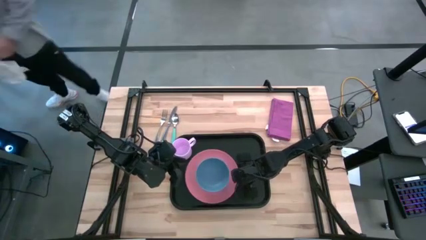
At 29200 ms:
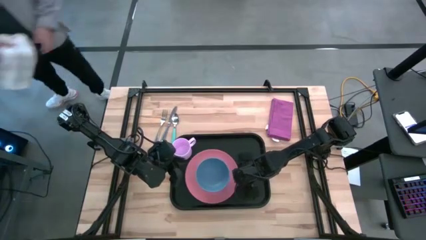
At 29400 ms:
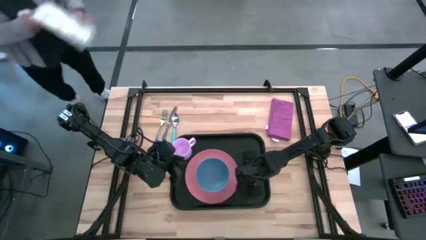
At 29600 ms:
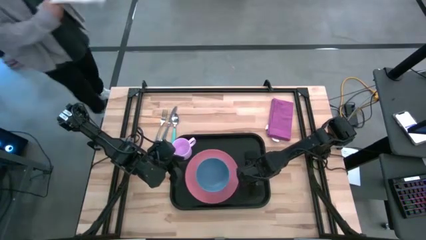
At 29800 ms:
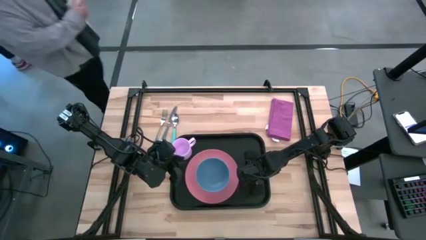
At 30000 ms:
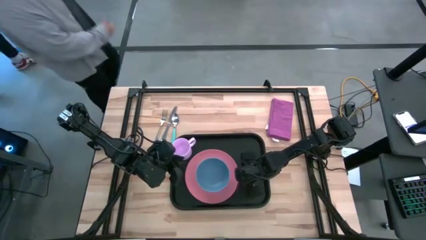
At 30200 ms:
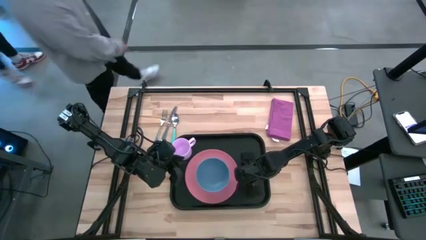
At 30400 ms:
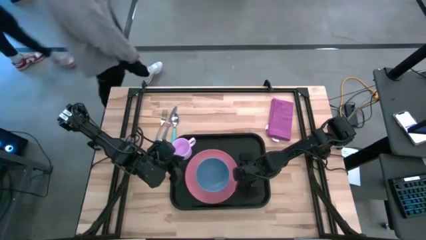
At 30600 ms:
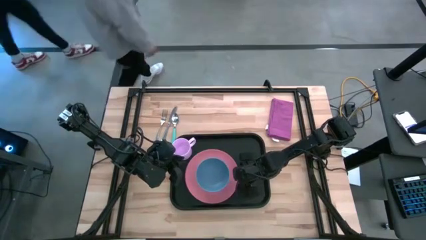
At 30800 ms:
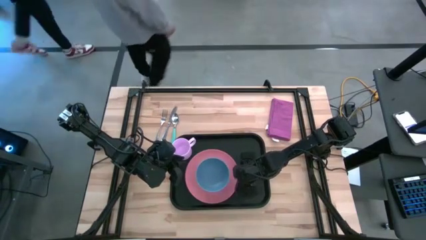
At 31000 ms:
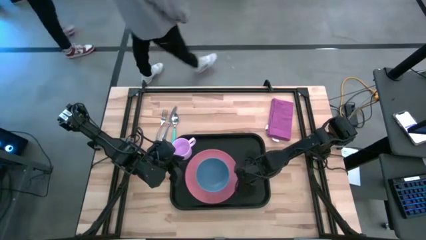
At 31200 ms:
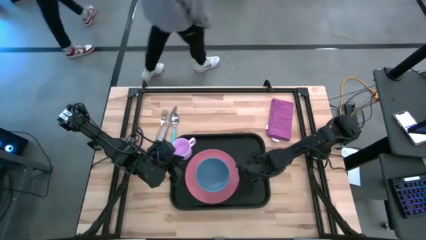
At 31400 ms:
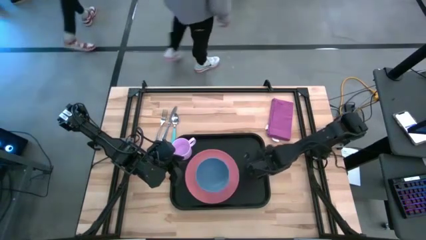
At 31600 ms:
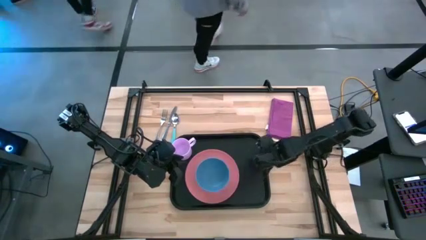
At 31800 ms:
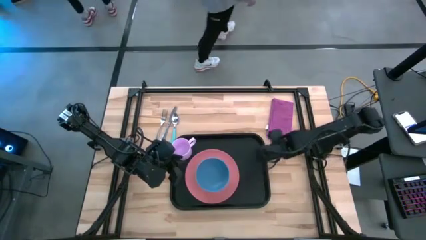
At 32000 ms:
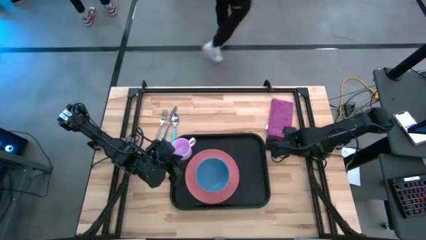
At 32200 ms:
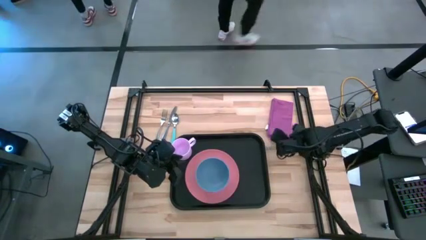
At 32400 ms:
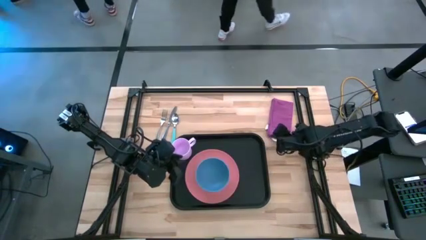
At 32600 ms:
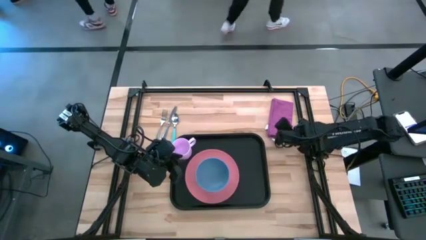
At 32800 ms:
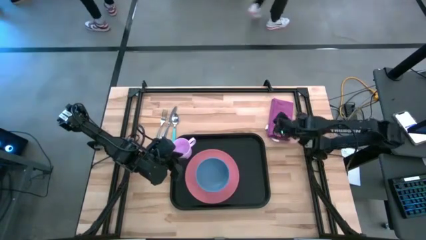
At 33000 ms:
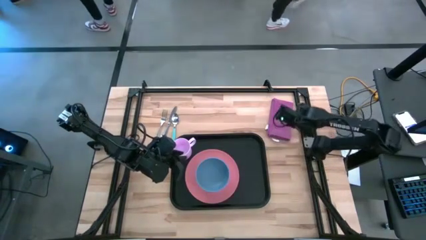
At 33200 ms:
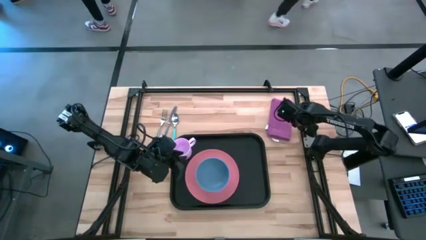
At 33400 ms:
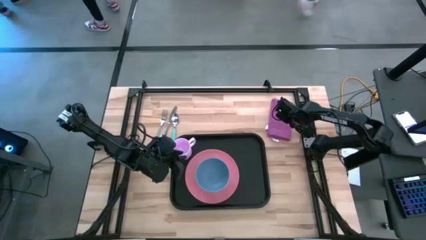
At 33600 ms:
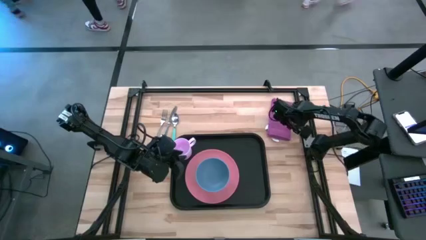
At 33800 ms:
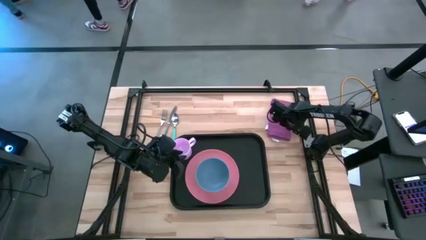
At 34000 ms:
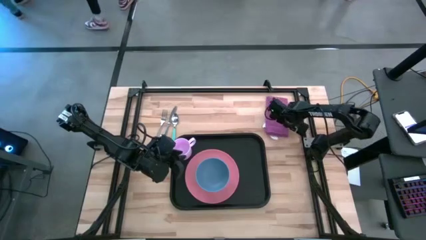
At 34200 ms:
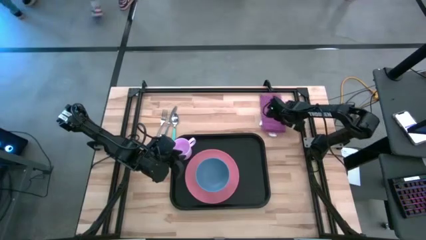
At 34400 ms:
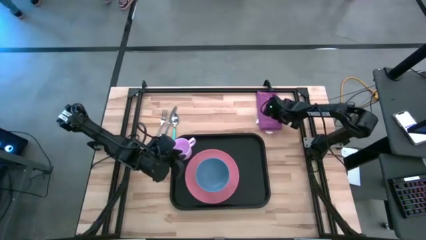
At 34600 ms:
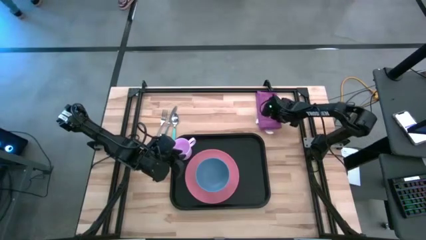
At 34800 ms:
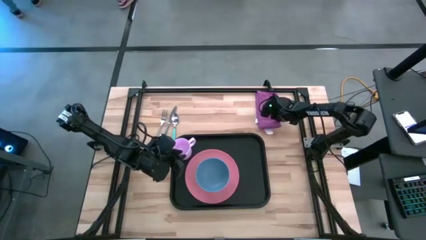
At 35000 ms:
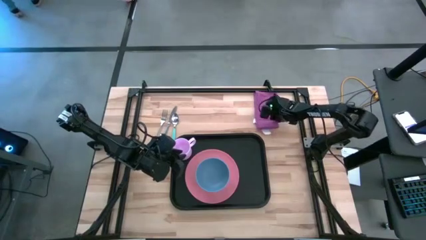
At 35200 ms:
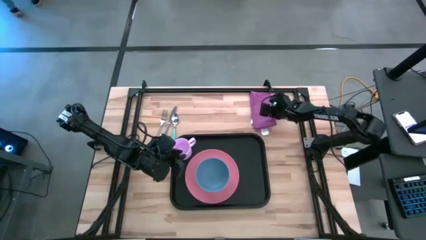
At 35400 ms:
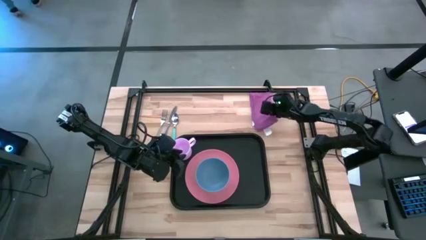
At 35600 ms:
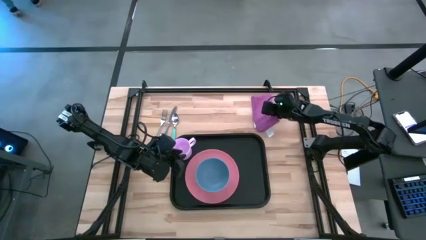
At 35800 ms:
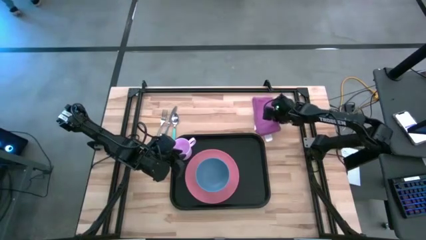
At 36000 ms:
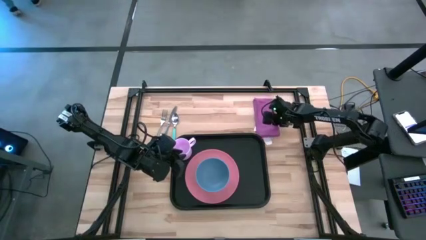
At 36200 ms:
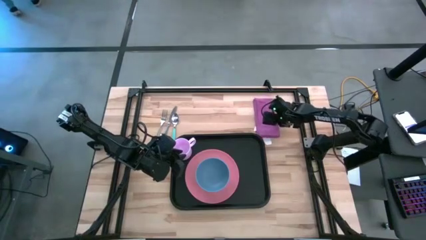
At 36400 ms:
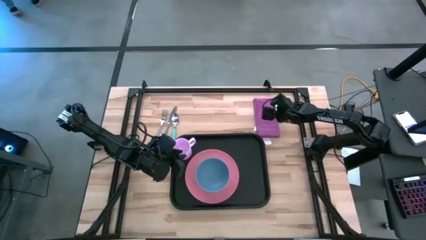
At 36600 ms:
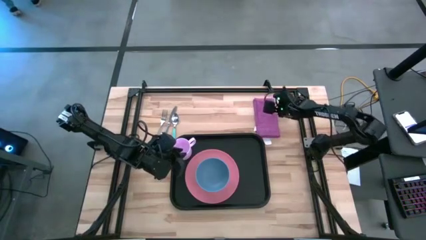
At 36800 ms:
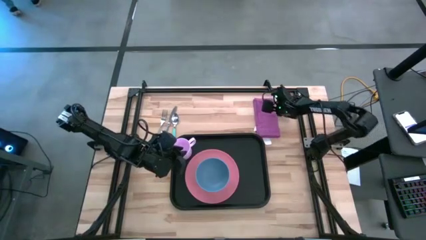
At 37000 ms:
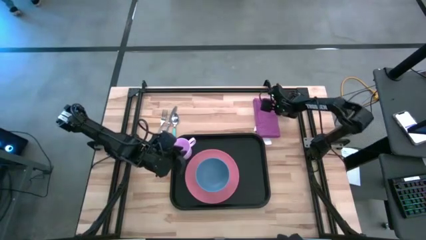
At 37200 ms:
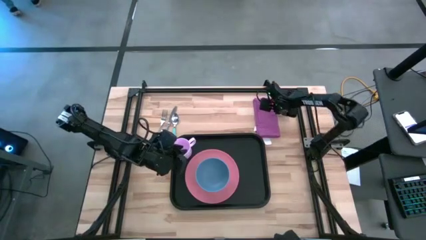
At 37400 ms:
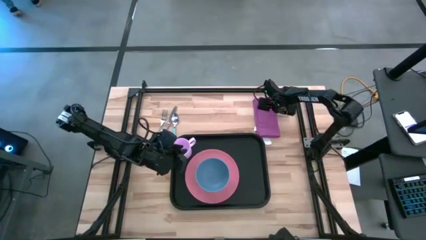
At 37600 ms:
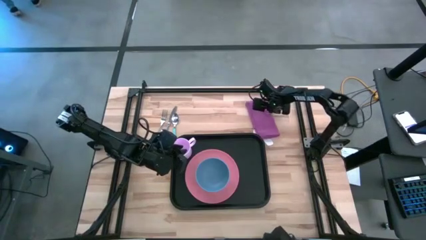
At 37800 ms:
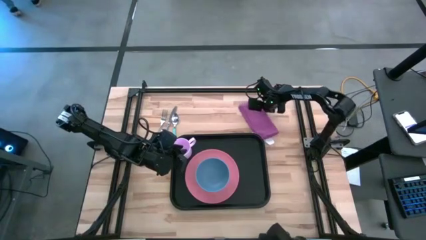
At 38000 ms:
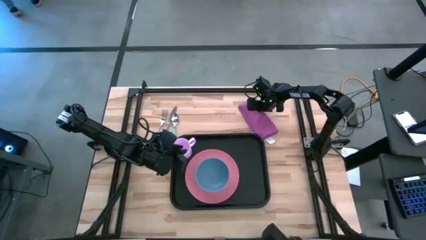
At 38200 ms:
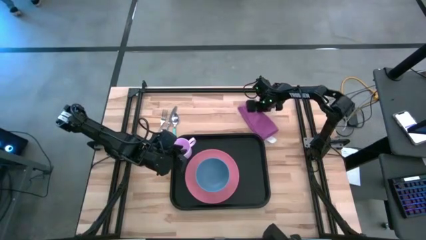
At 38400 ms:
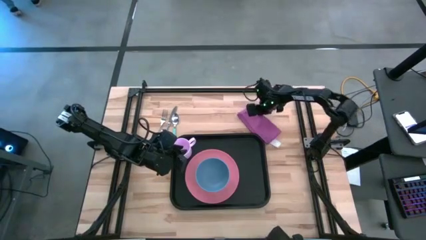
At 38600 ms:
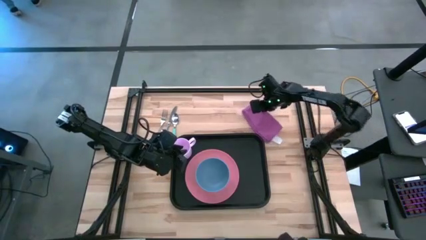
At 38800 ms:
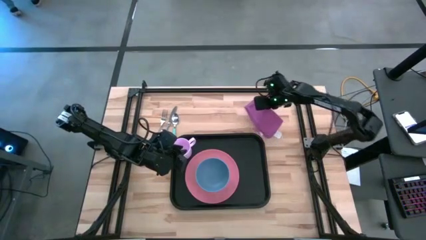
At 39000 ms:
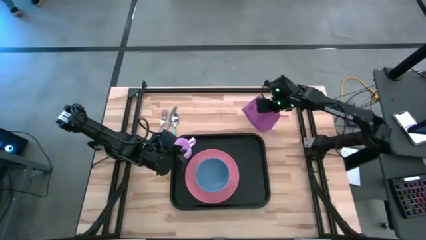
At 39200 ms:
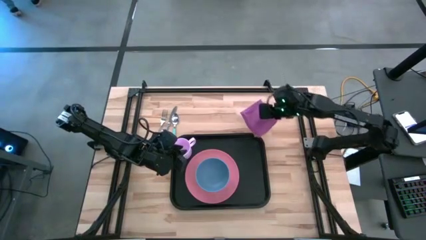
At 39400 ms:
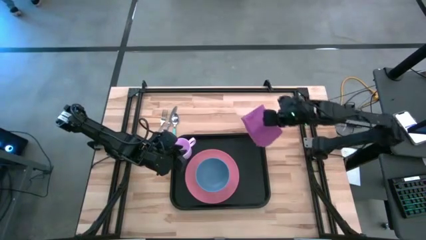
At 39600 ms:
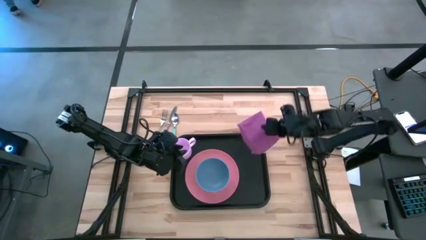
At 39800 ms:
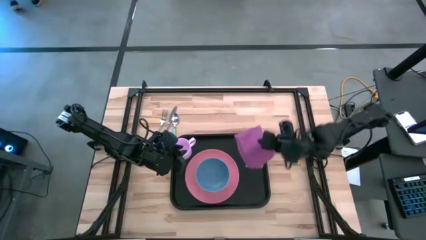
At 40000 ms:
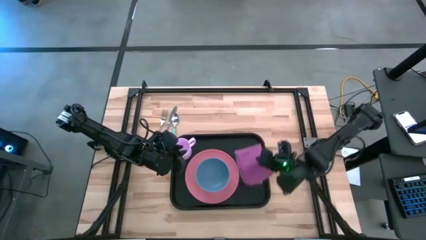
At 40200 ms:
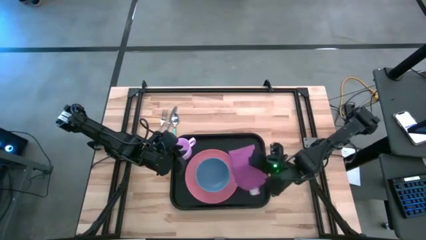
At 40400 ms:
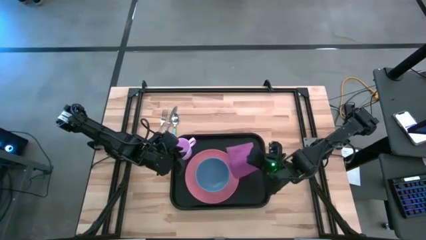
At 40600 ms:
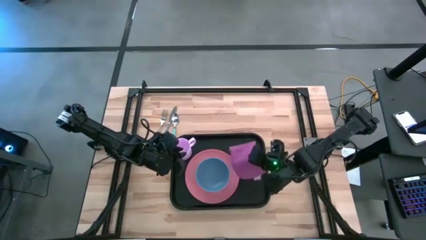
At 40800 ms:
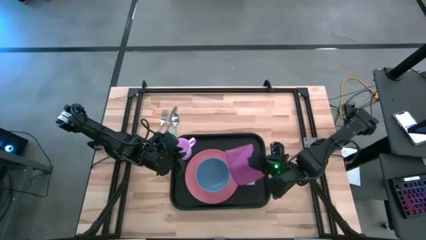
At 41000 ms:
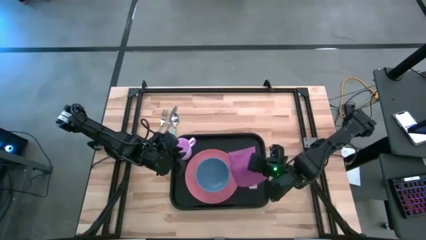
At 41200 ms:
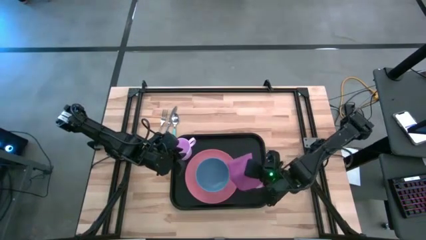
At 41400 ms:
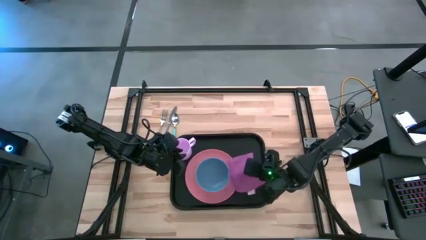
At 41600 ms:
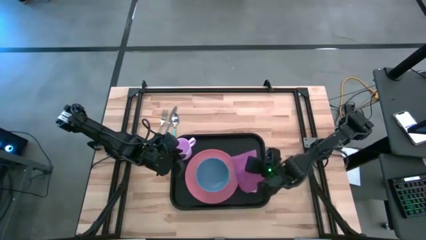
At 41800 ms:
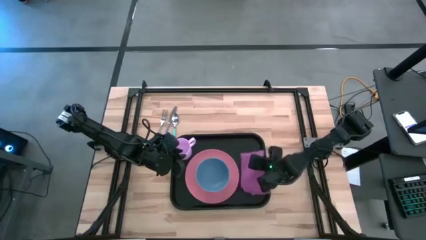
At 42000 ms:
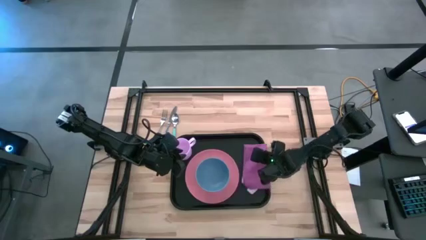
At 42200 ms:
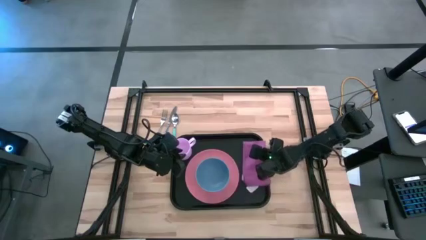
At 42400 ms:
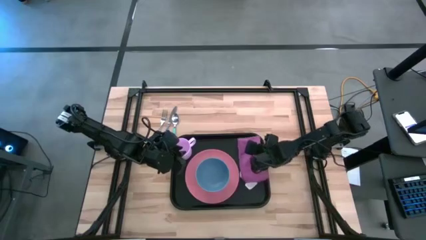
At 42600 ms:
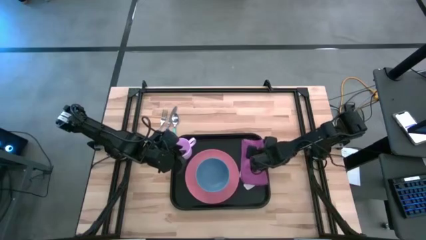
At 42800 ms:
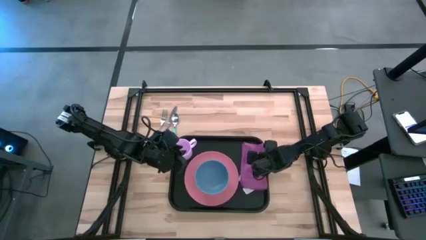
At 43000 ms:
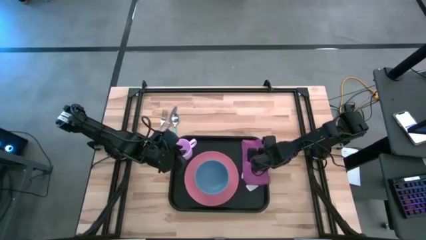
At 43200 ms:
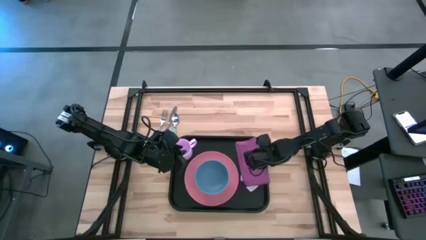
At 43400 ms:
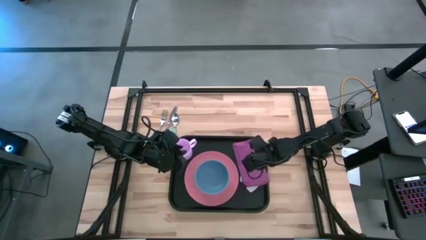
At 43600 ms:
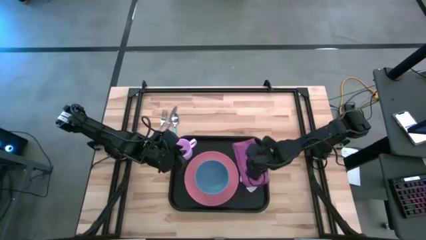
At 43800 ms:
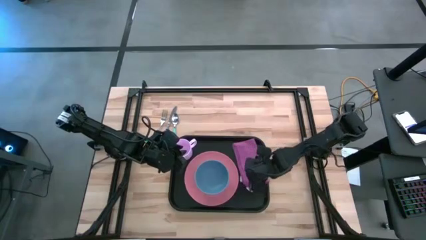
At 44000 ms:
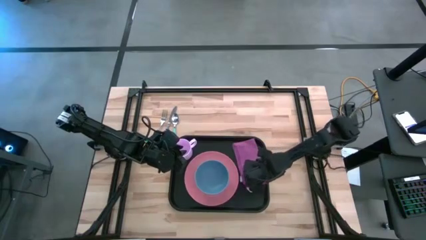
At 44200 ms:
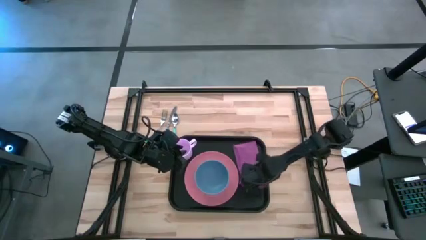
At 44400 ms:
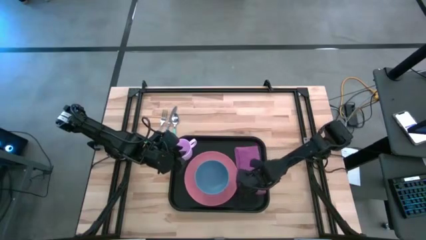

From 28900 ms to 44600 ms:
Task: Set up tray
Put the purple napkin to the right of the pink plate on the black tray
